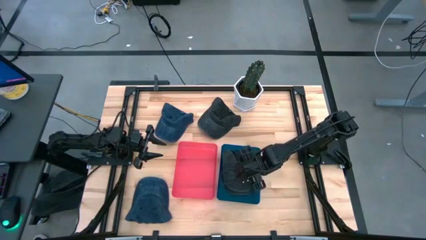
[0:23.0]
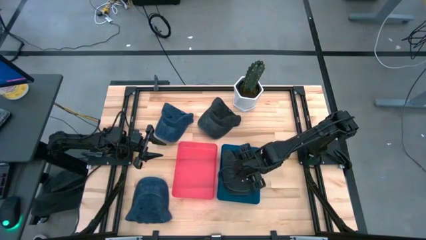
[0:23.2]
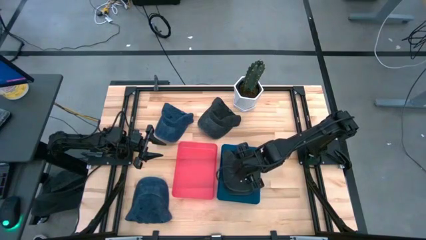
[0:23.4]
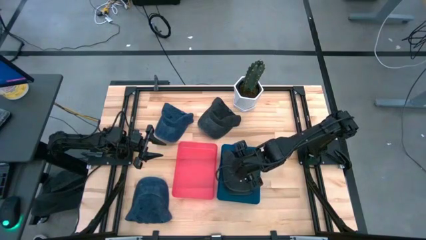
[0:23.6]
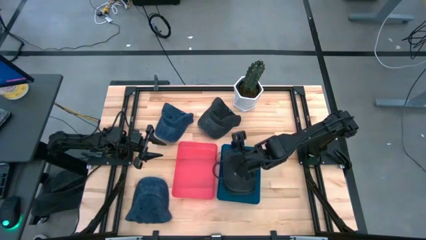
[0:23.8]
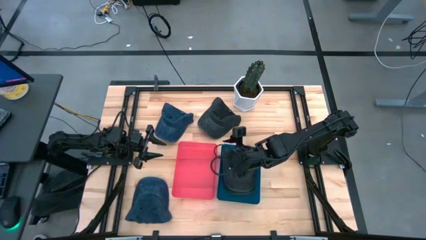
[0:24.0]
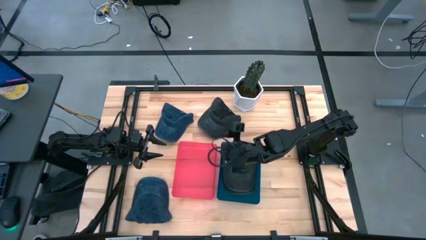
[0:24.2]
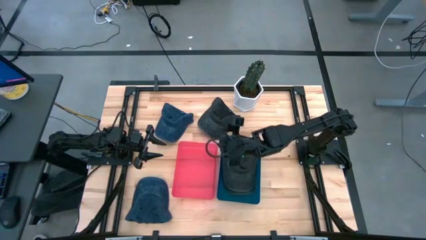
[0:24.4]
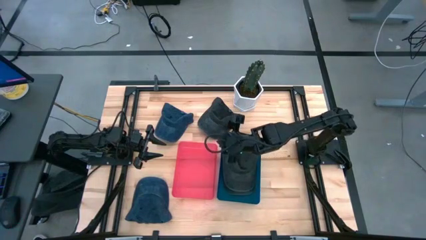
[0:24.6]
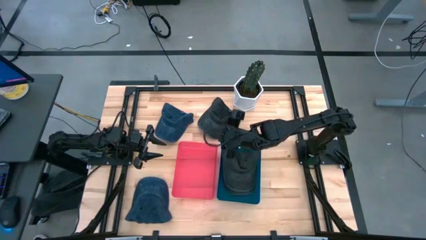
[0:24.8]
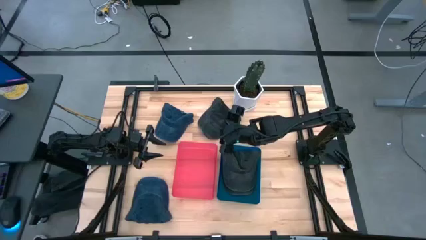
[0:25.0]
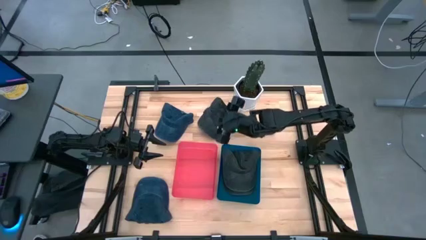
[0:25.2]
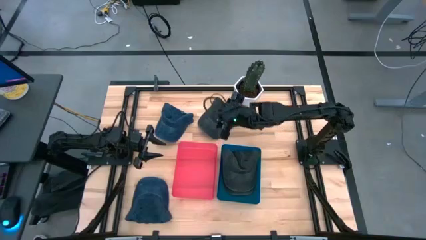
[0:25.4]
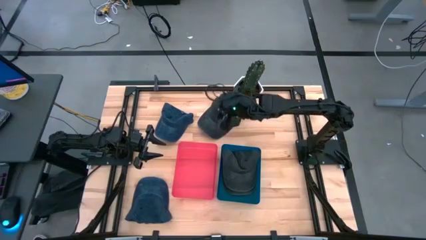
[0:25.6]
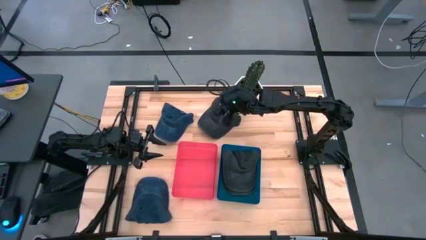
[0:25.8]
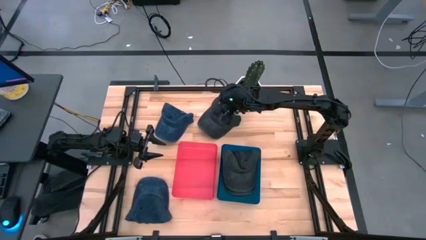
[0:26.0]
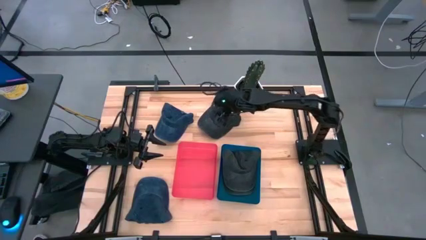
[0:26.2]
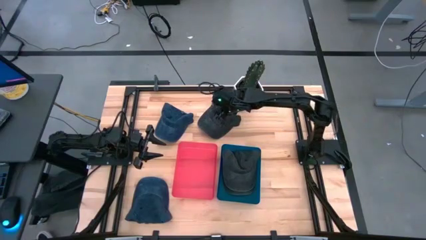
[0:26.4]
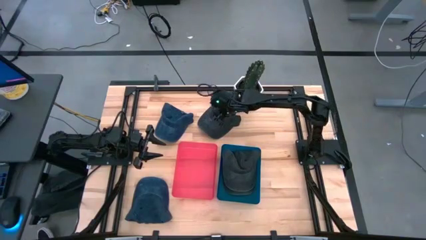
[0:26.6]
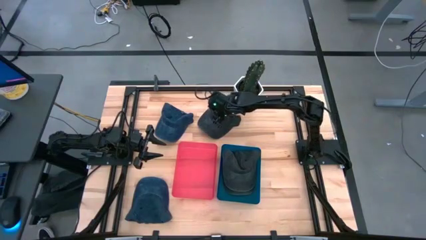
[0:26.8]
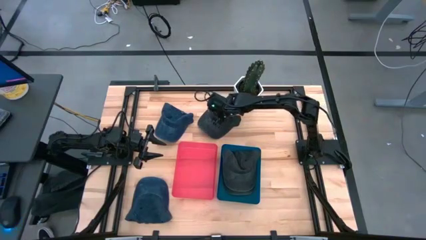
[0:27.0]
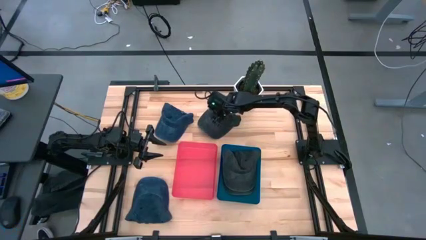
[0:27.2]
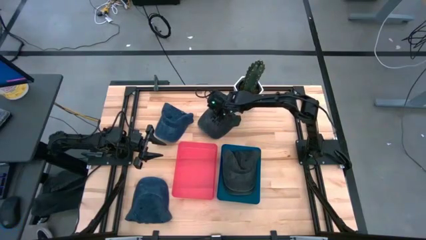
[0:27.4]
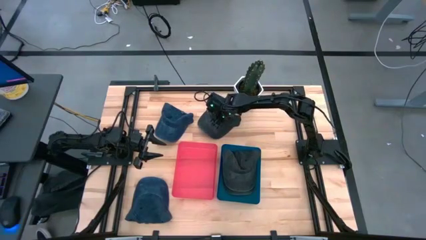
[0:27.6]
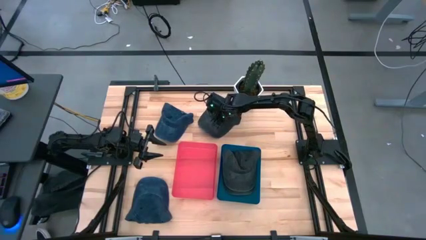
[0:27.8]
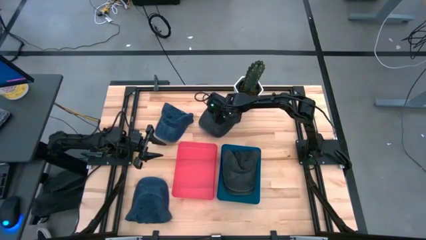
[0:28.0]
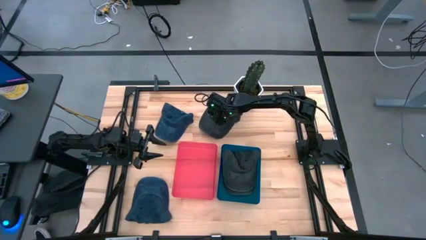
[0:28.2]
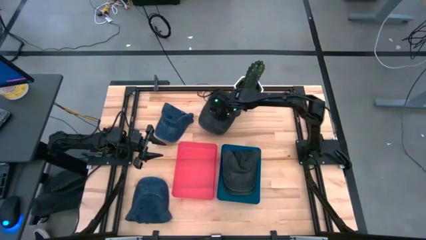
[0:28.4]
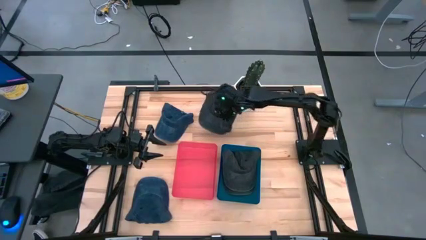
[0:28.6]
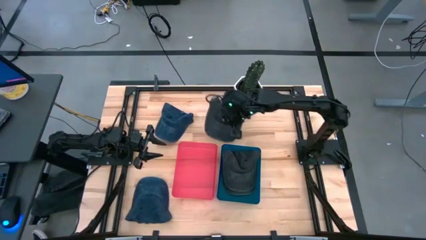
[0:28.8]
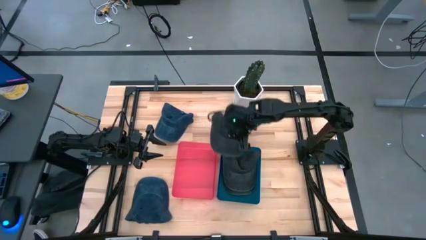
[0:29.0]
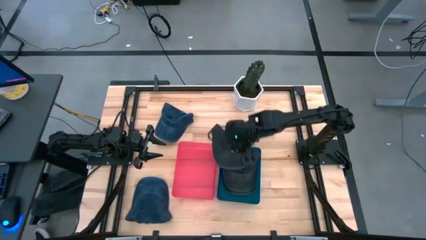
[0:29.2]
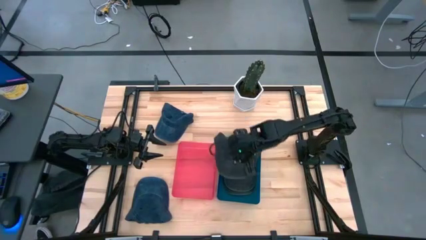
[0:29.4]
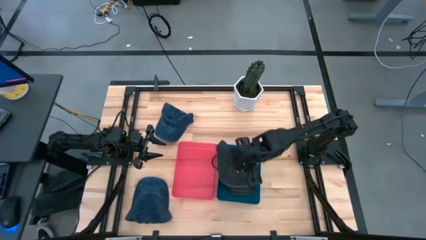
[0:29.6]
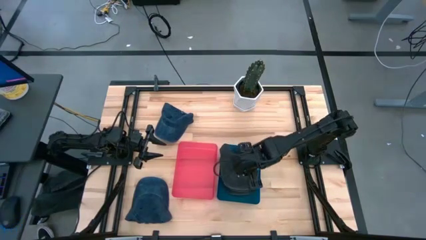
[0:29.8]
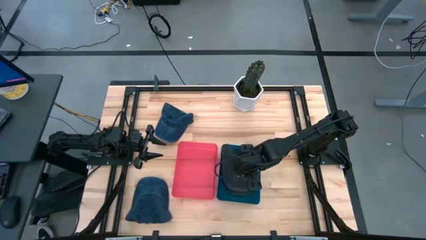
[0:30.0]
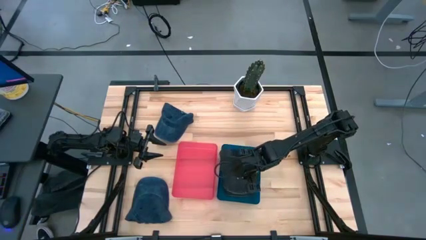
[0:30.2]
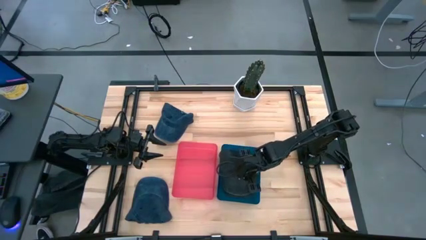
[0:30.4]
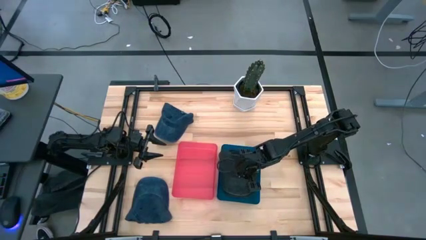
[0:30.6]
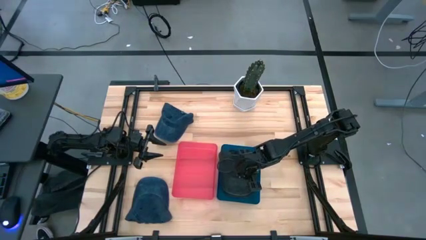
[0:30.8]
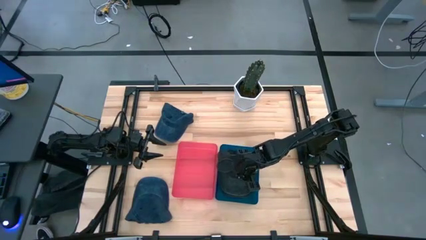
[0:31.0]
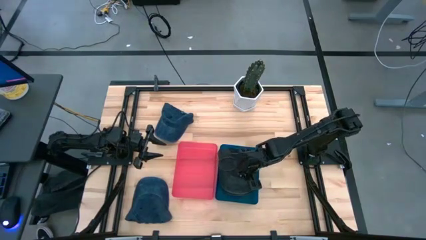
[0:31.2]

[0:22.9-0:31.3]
Task: Pick & Place hat
Put the black cap into the blue bin

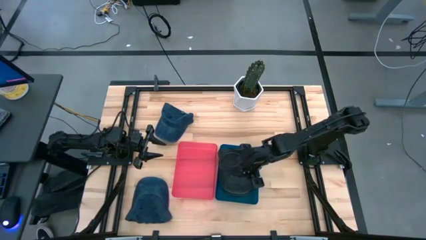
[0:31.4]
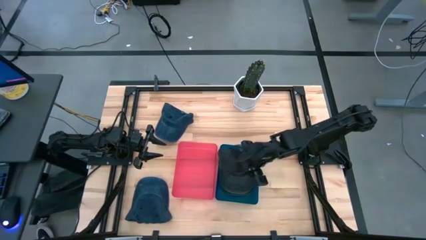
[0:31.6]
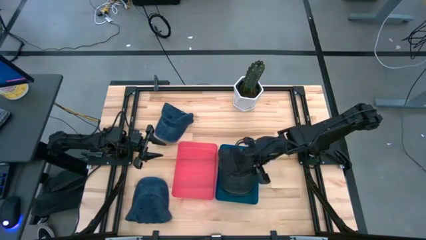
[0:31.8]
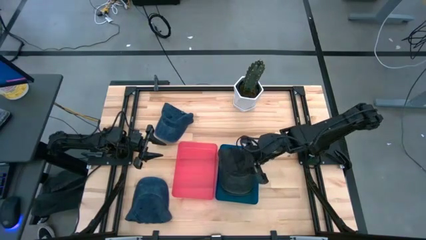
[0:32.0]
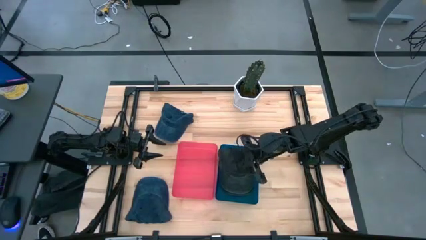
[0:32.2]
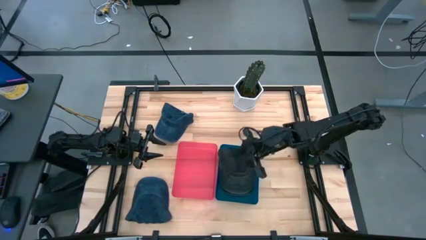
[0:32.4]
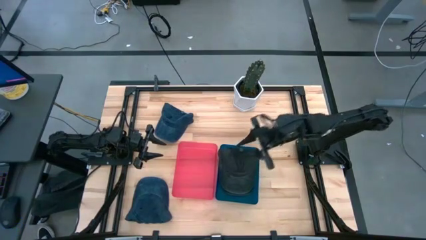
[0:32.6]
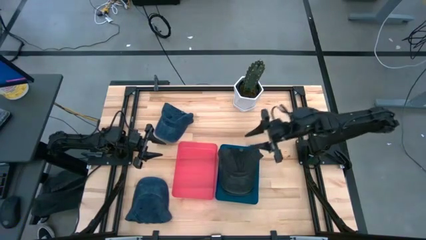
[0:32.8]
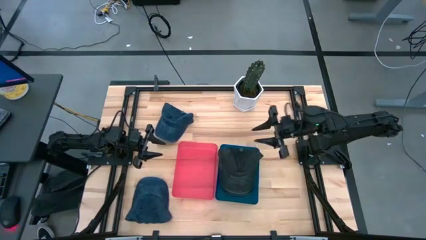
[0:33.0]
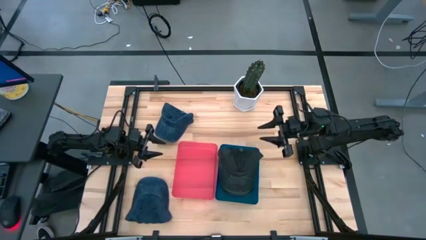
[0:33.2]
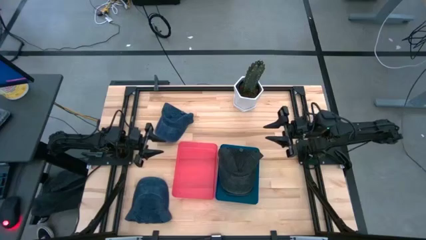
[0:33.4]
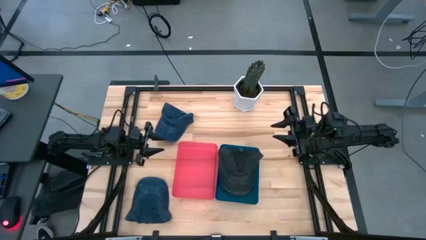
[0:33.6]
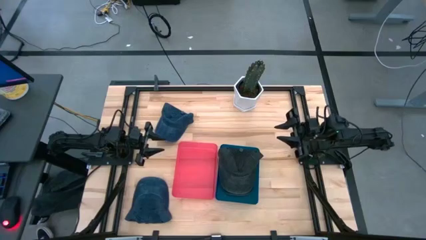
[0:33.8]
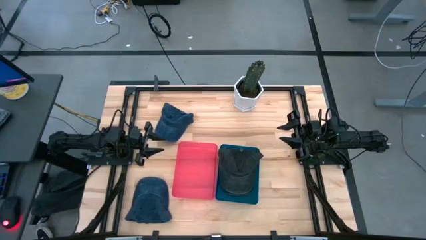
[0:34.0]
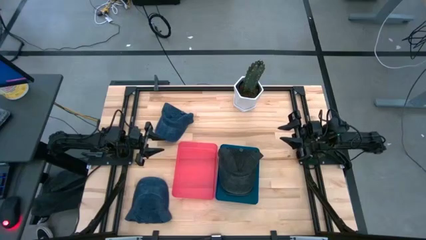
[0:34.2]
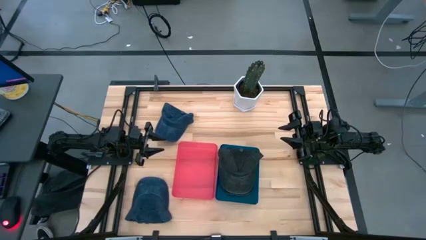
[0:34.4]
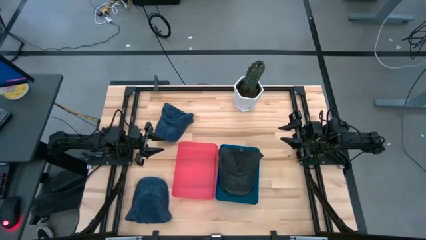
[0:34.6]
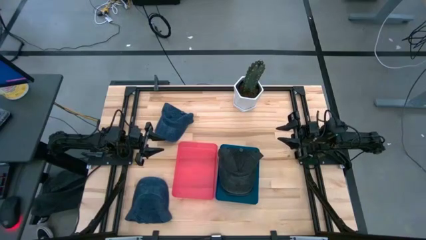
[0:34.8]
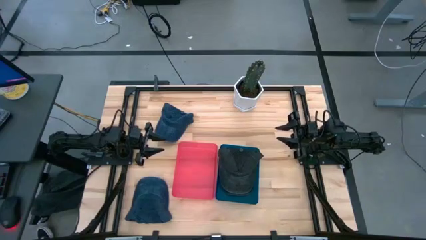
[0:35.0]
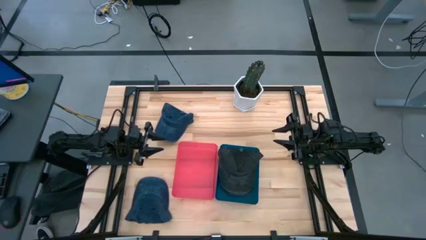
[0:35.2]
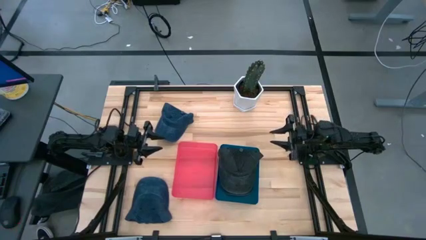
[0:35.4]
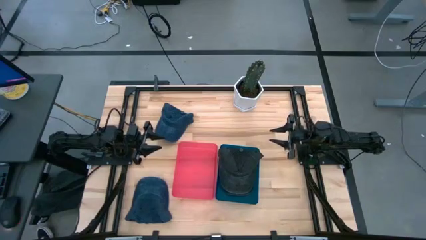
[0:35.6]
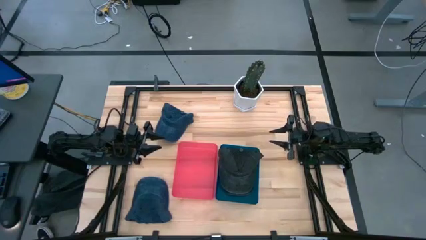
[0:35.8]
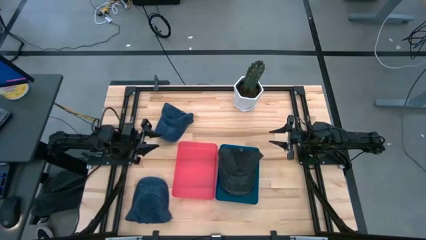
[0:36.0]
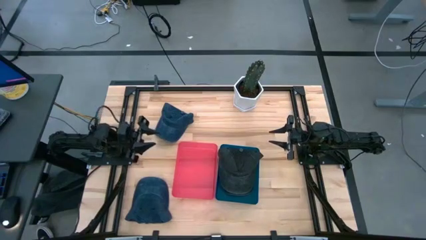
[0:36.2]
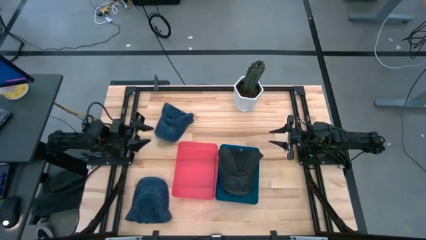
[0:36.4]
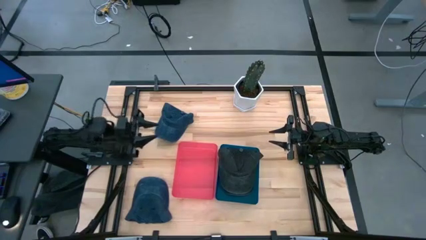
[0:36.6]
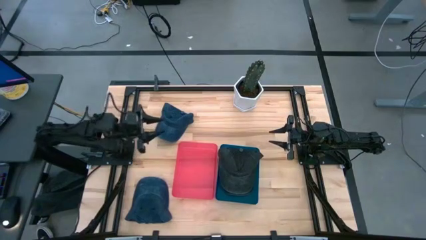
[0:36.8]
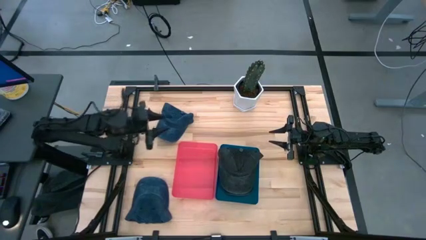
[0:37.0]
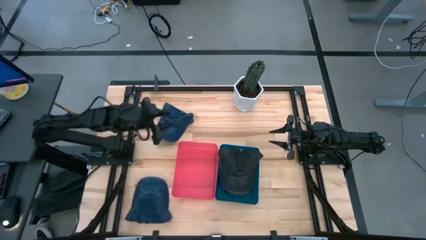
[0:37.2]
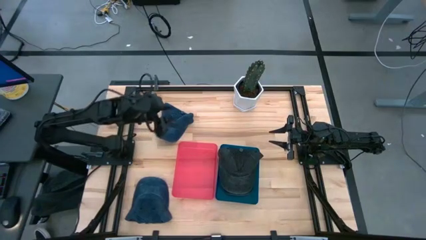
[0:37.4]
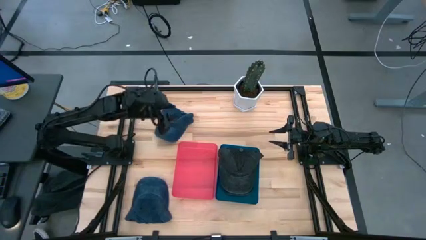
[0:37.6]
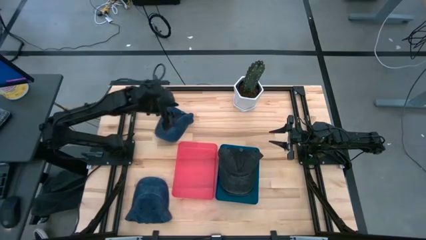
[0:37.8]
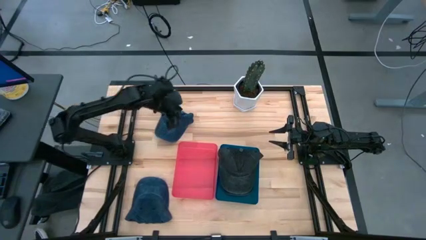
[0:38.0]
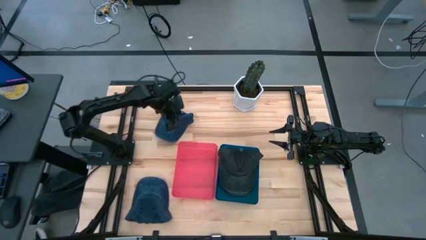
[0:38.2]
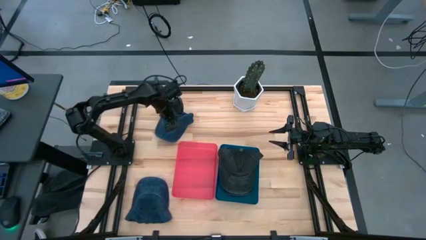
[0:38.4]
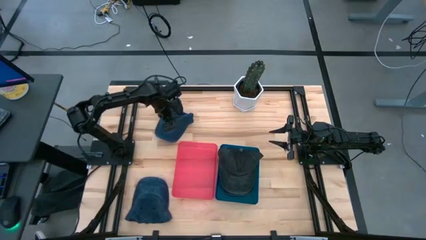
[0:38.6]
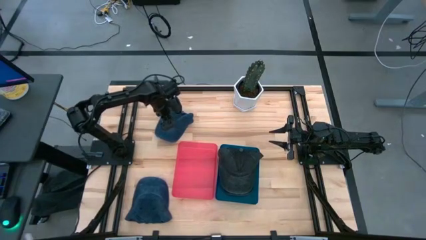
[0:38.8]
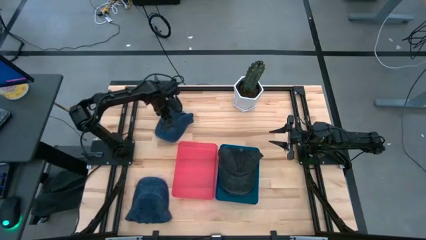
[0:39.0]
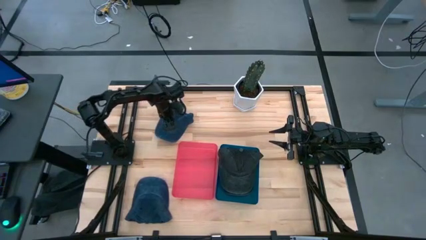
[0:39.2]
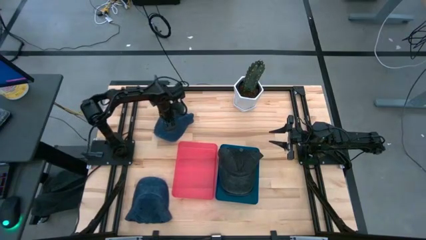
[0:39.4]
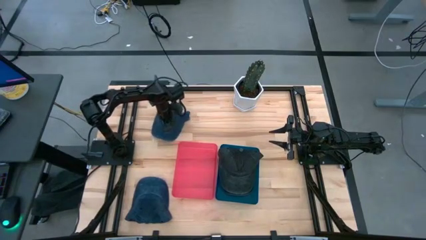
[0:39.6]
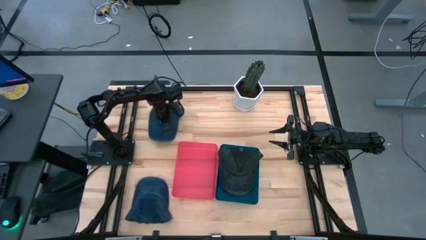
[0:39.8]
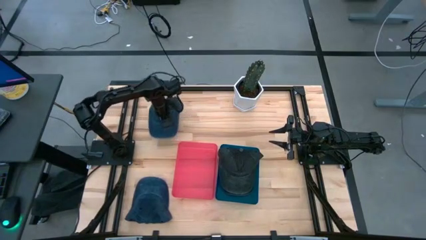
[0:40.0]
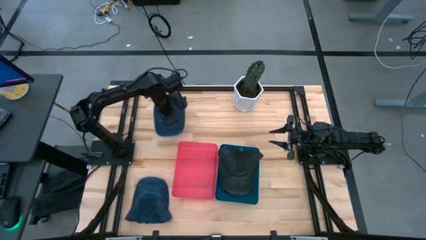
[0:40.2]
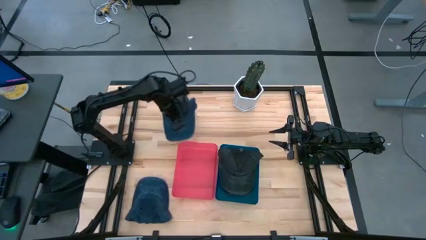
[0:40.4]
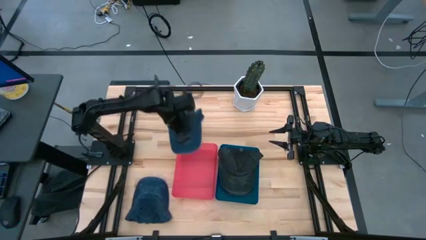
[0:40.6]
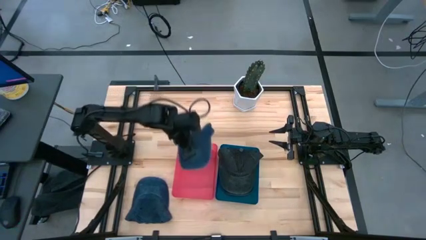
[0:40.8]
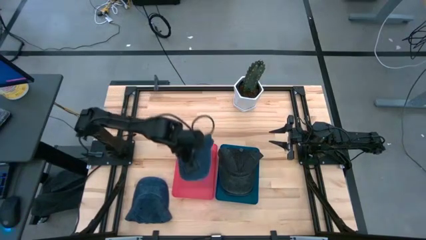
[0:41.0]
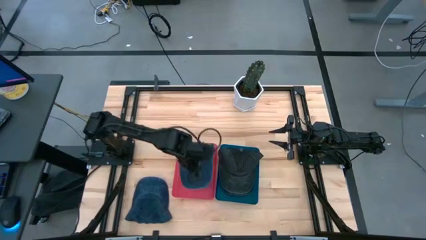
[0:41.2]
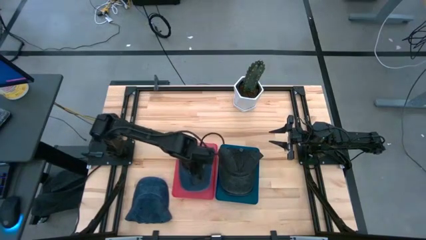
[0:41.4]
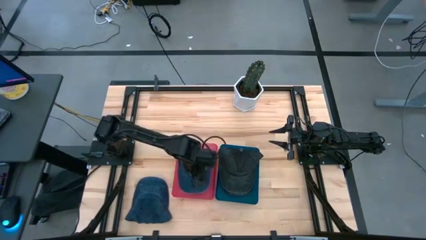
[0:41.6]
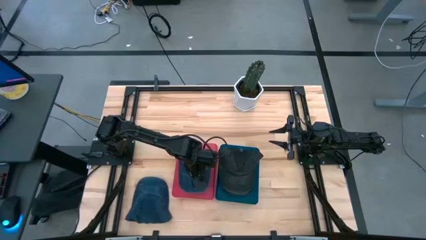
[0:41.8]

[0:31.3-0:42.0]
Put the top blue cap into the pink bin
